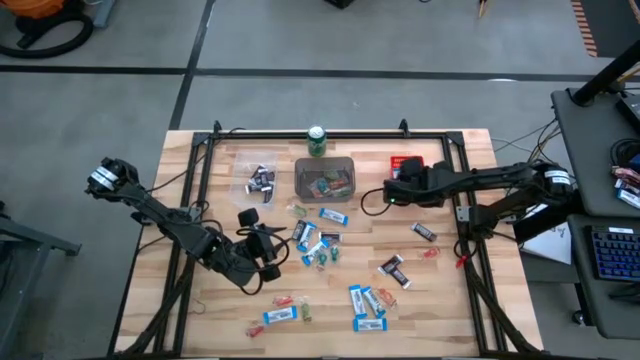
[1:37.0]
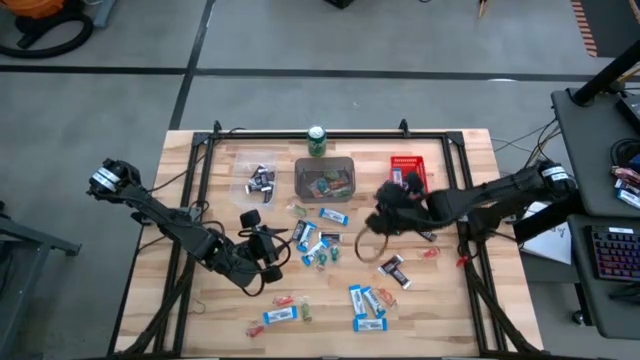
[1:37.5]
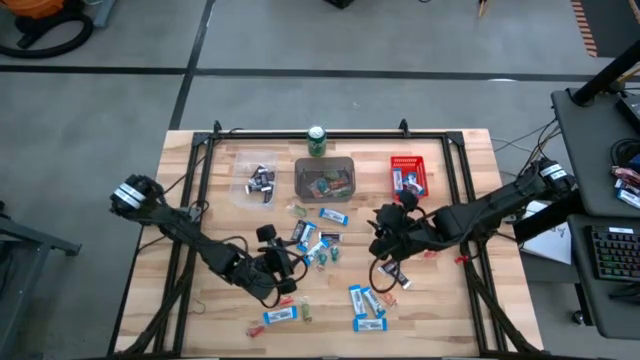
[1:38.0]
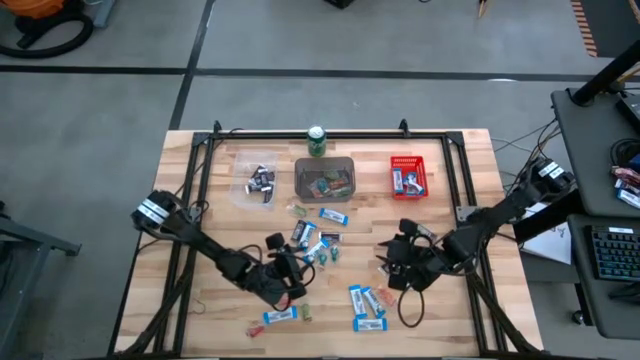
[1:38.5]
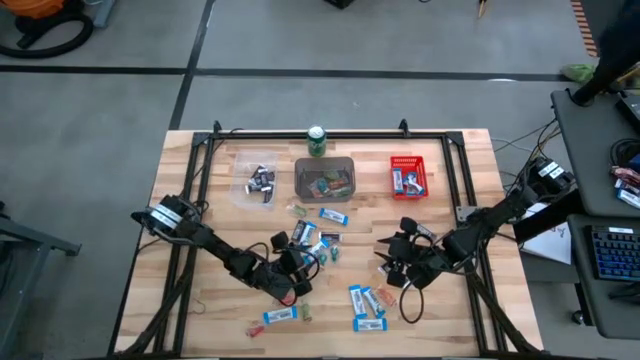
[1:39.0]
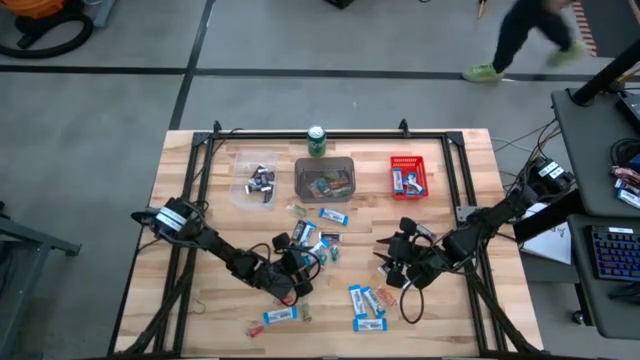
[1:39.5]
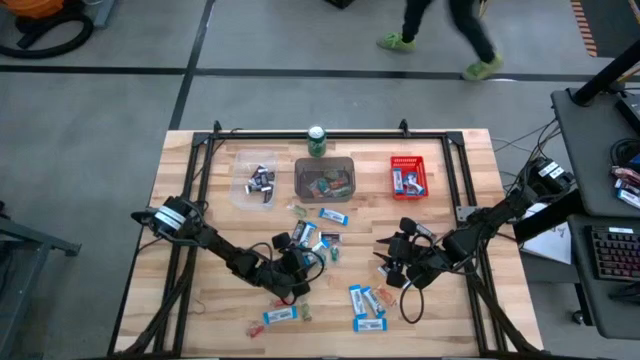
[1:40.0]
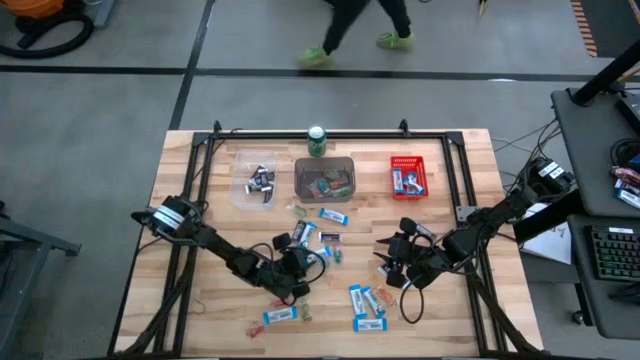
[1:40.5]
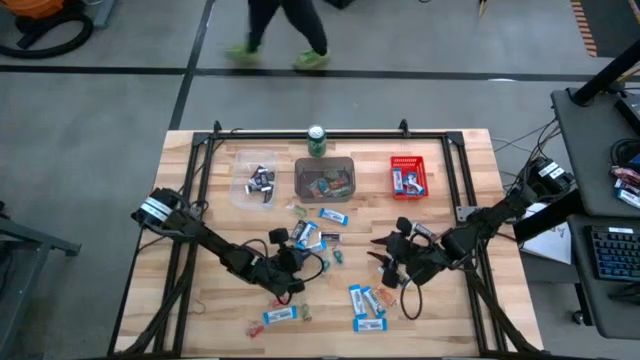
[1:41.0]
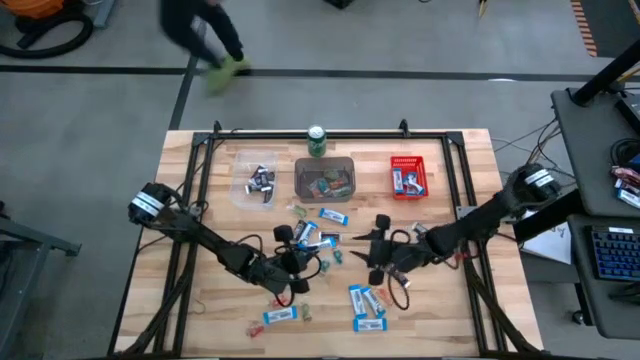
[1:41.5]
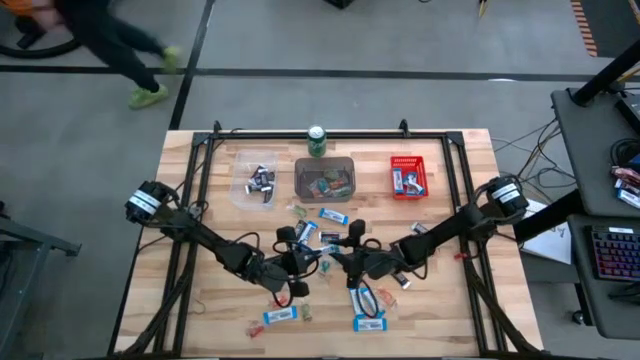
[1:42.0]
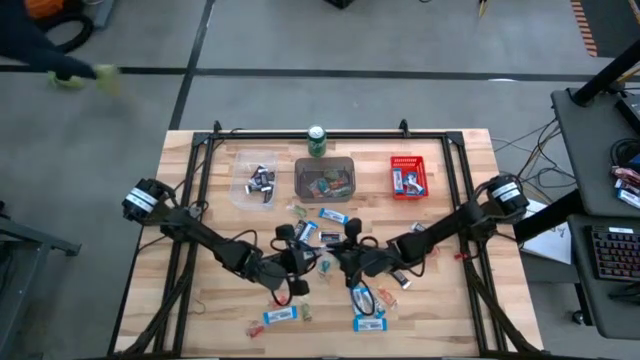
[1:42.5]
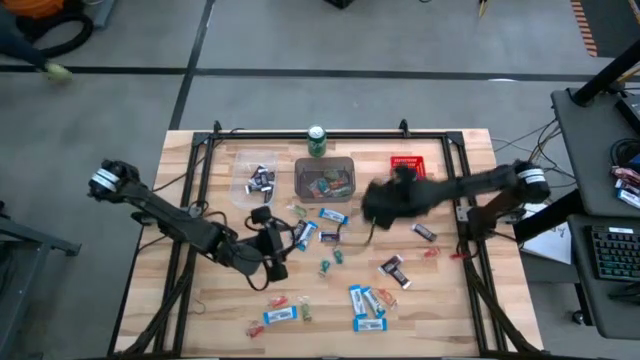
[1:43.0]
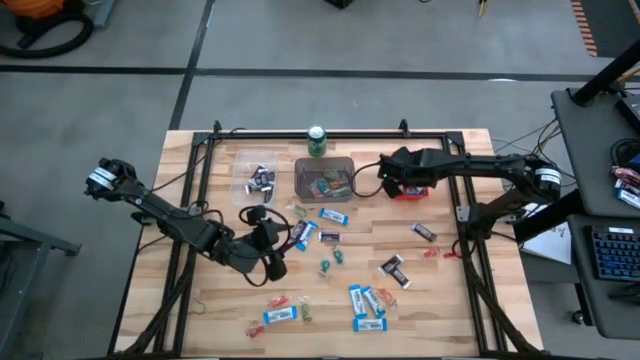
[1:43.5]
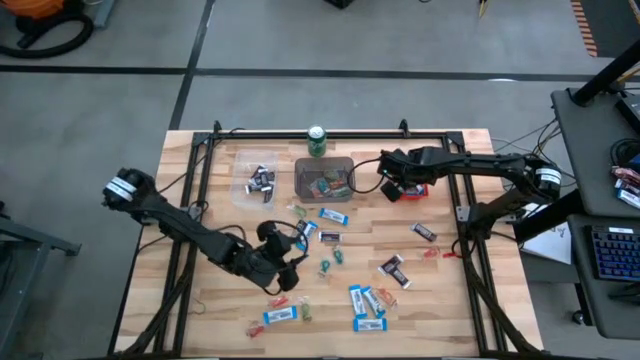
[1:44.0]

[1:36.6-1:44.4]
Task: Organize candy in baskets
Put the white chocolate bar into the red bin

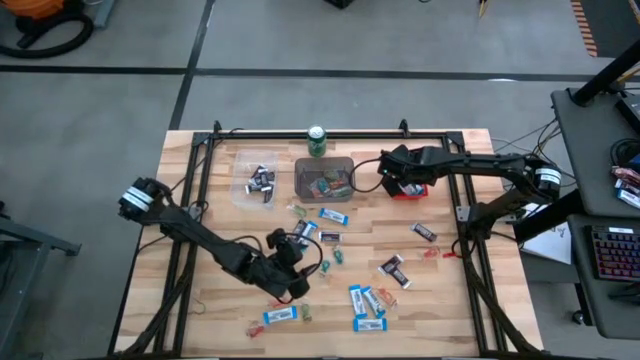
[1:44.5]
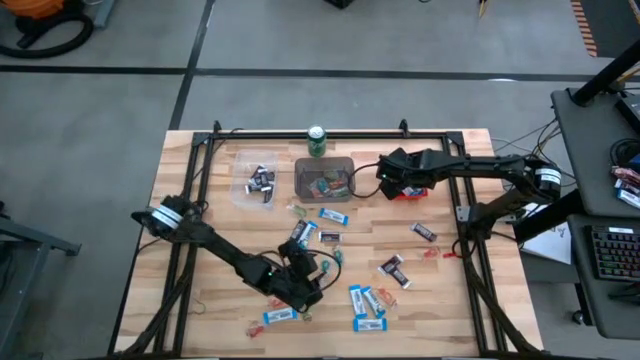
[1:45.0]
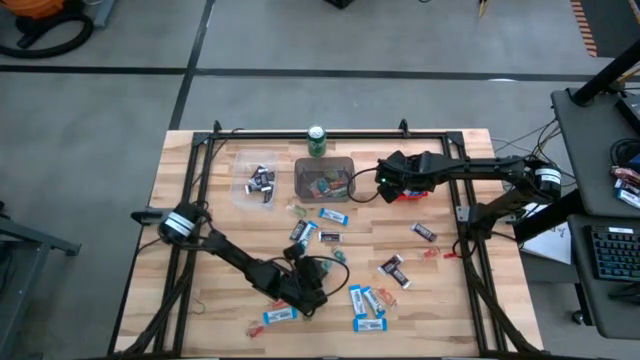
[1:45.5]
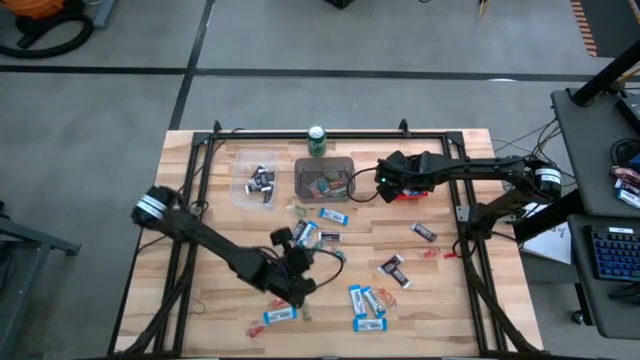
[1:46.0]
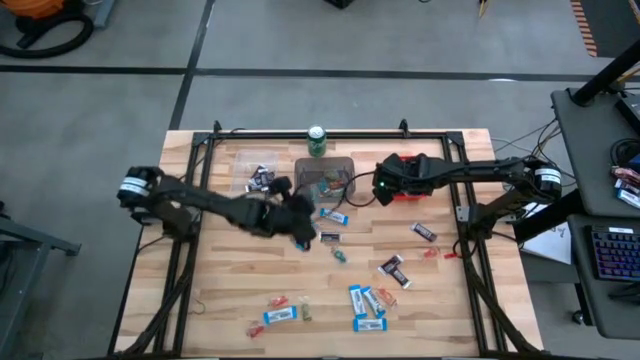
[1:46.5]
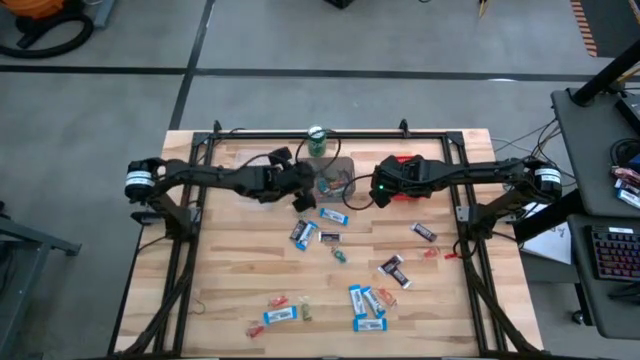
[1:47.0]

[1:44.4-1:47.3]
Put the dark blue gummy into the black bin

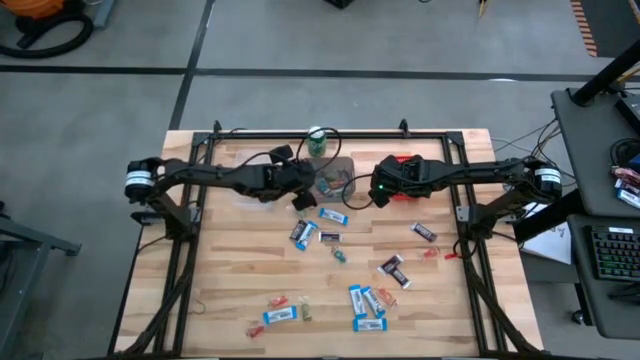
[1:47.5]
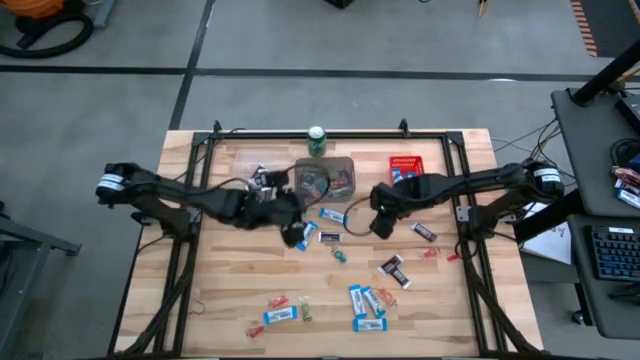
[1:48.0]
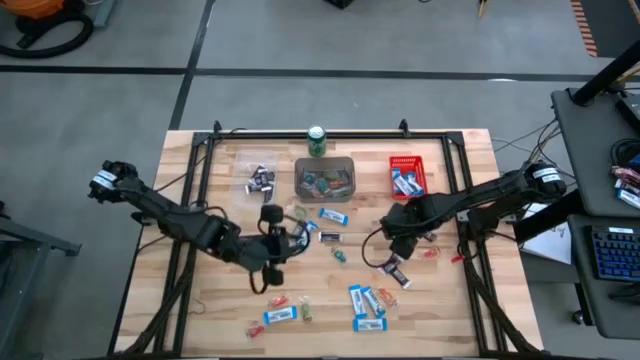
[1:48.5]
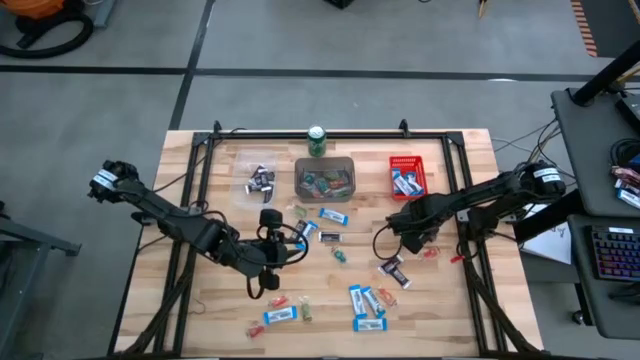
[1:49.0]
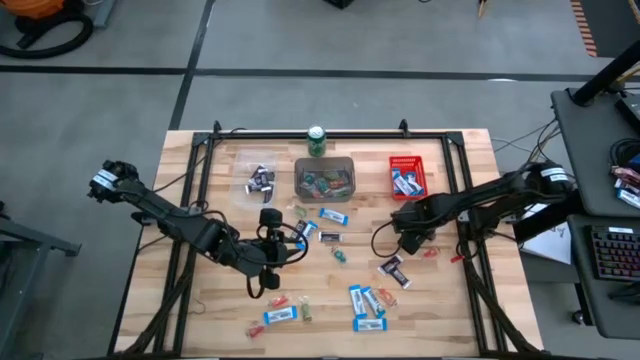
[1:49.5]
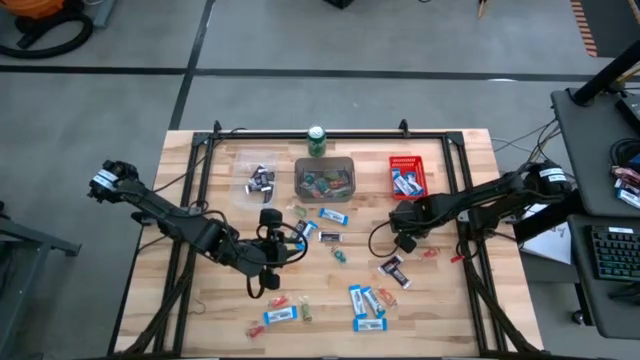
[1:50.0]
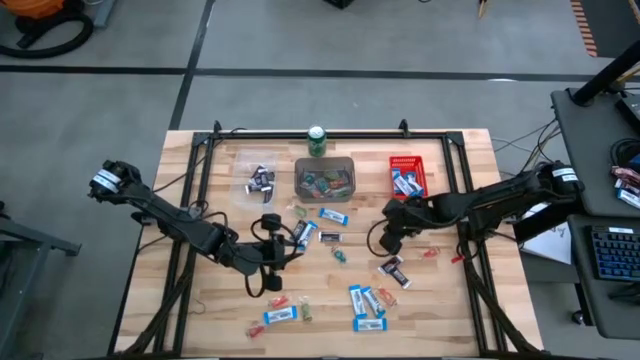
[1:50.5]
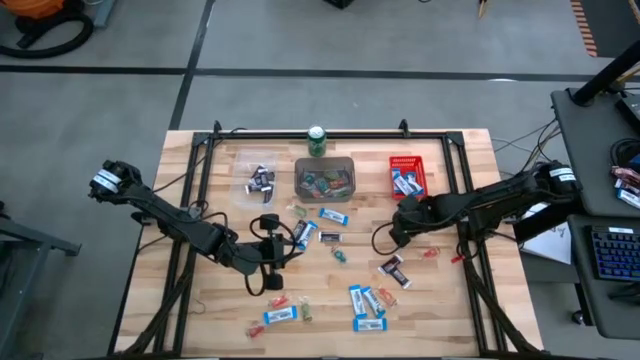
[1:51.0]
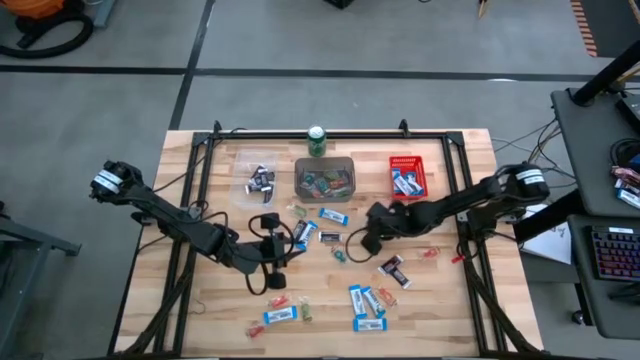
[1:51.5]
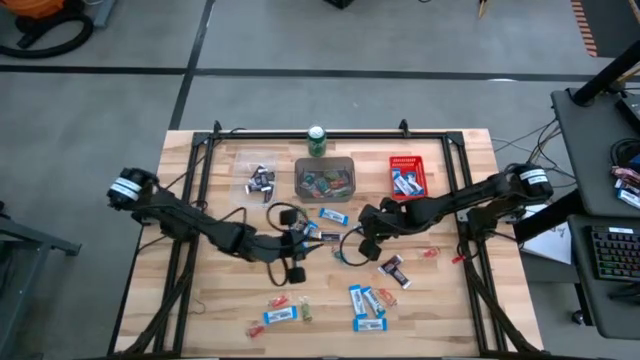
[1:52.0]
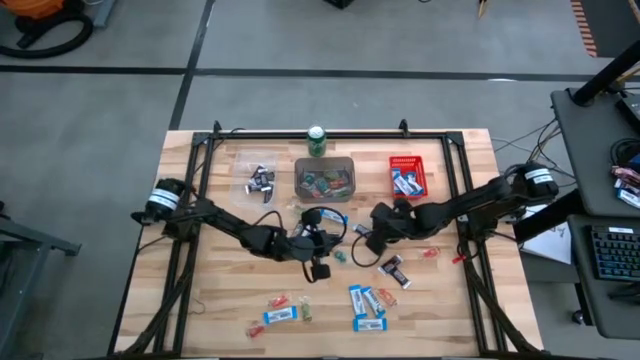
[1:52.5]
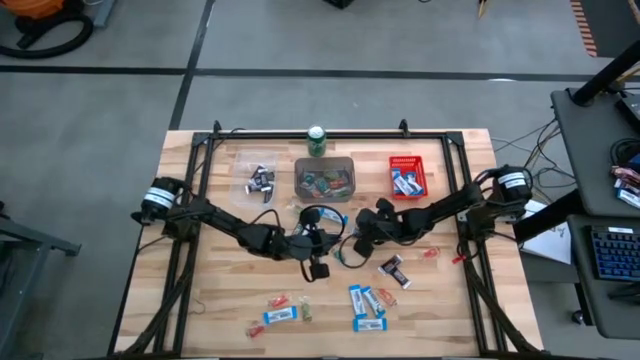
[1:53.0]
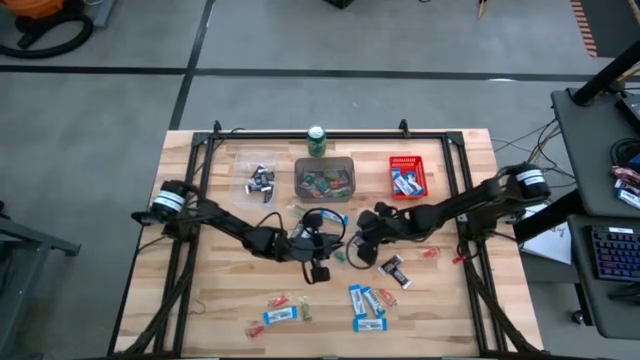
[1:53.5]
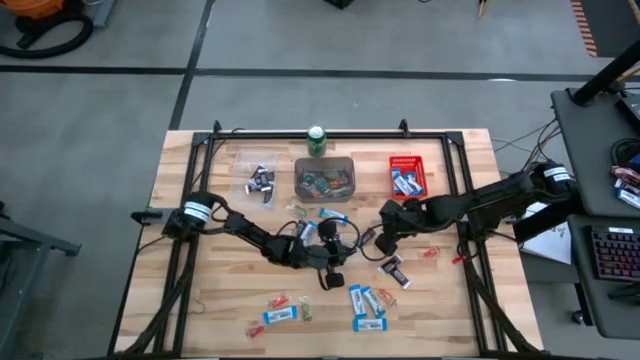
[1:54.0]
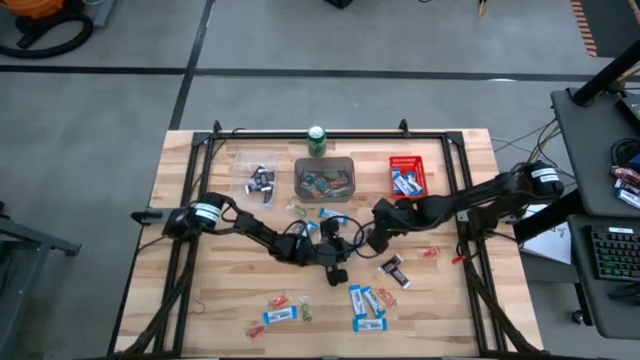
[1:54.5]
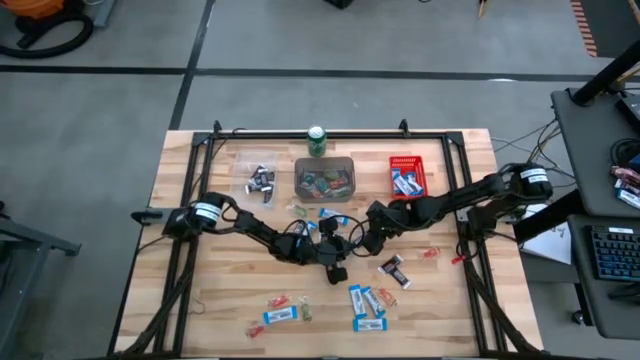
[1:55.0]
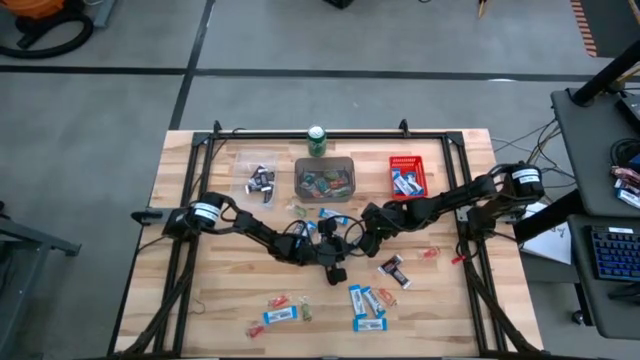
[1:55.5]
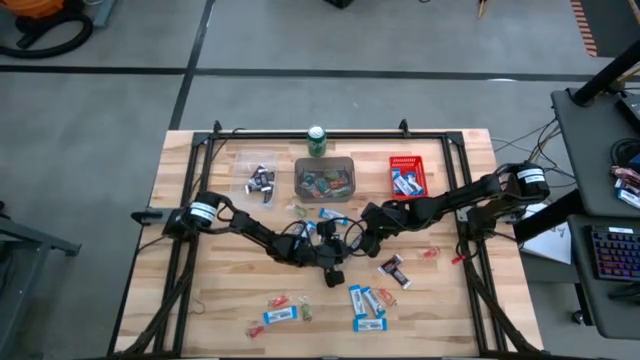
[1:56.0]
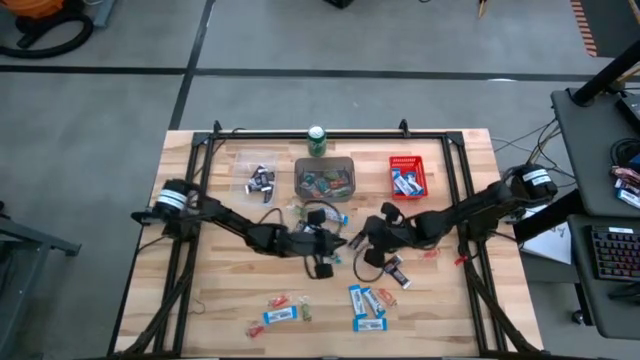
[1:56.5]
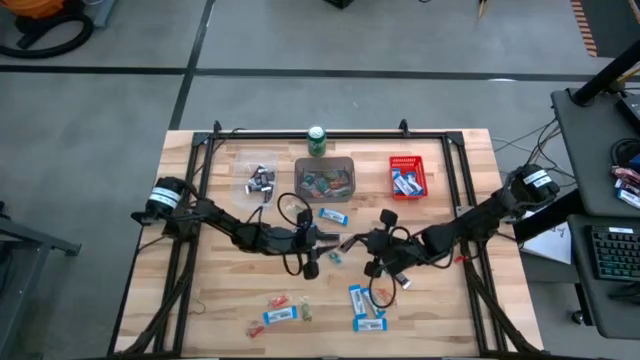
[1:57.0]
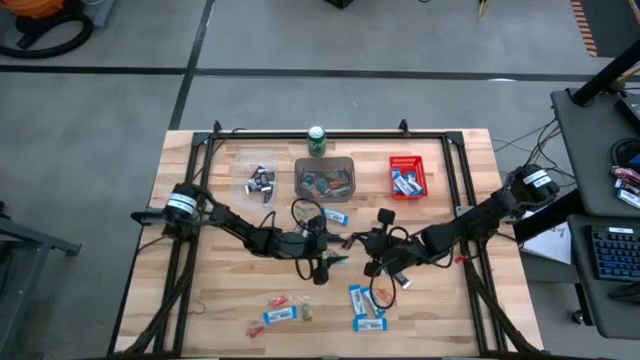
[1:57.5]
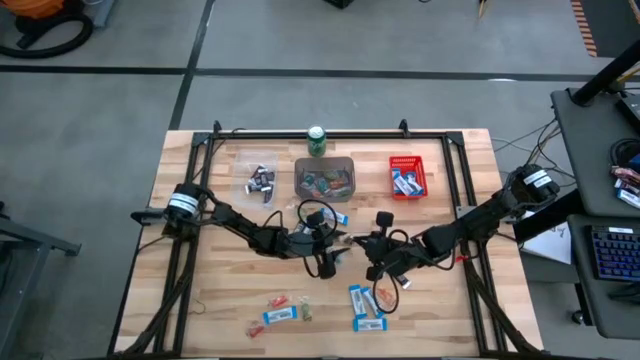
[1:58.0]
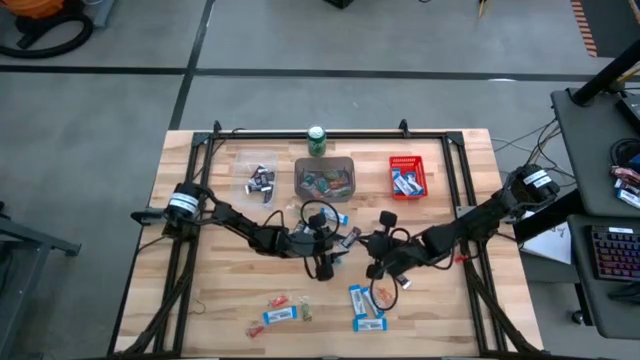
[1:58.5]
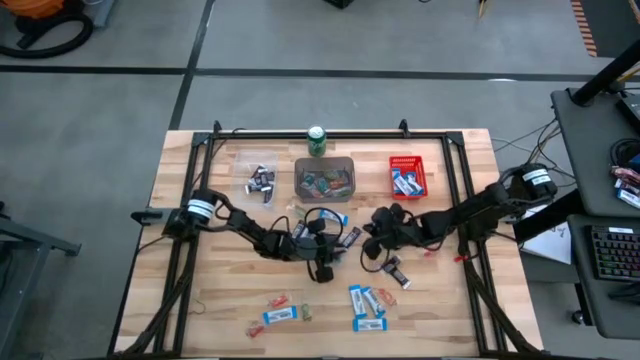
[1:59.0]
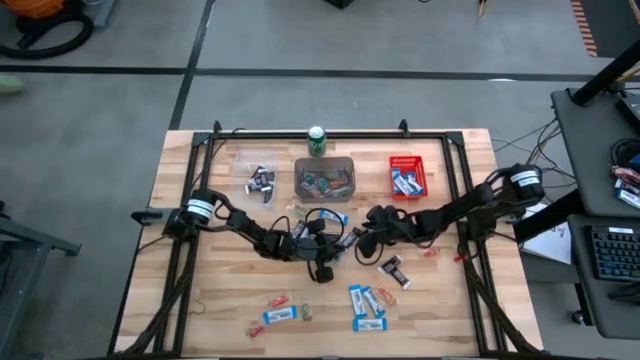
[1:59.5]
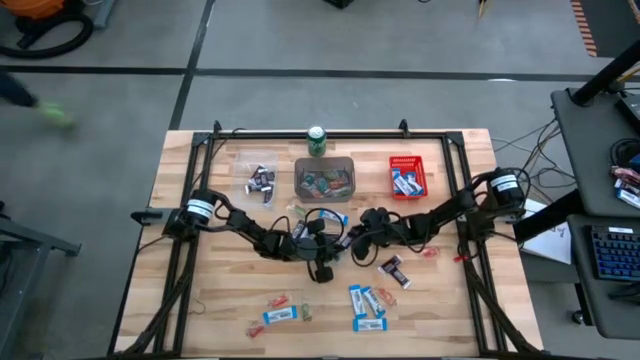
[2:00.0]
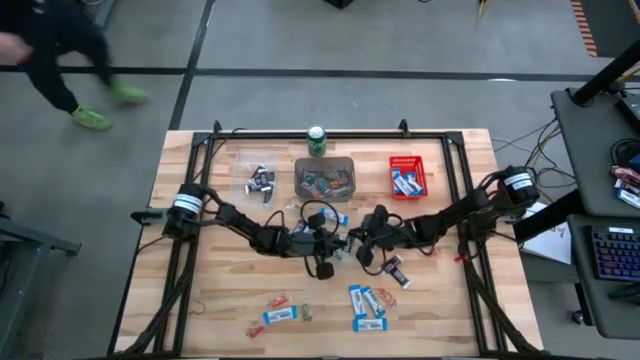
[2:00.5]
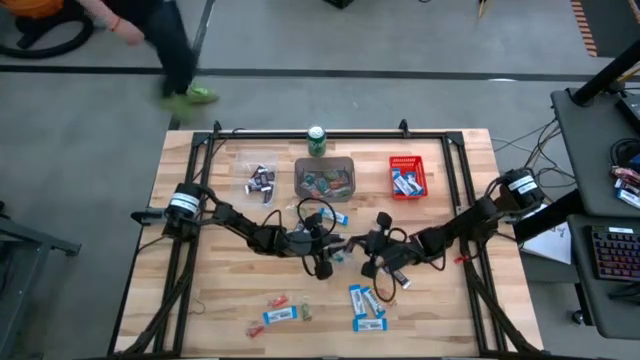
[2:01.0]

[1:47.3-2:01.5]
Put the brown chocolate bar into the transparent bin
